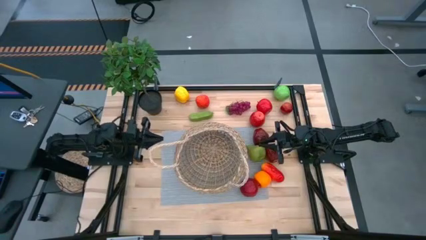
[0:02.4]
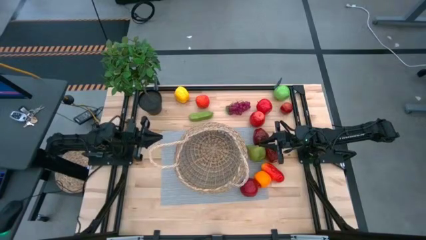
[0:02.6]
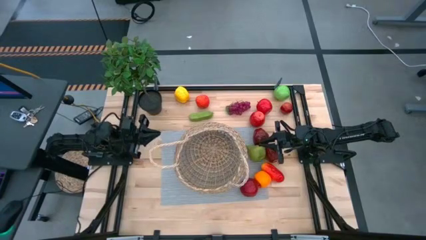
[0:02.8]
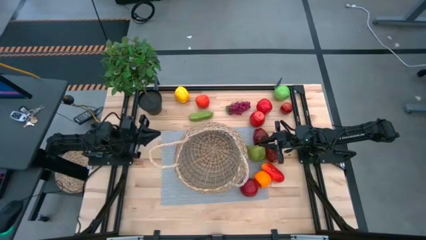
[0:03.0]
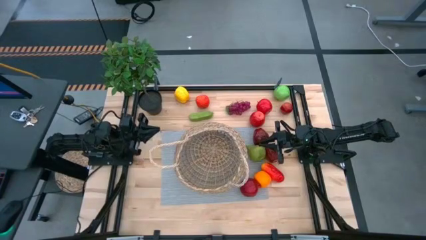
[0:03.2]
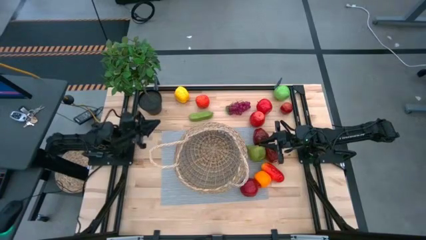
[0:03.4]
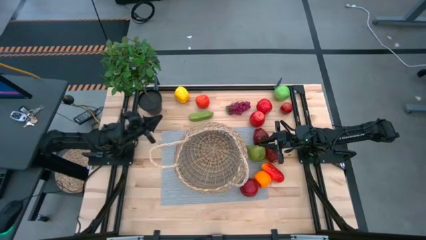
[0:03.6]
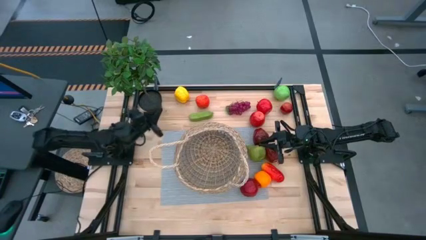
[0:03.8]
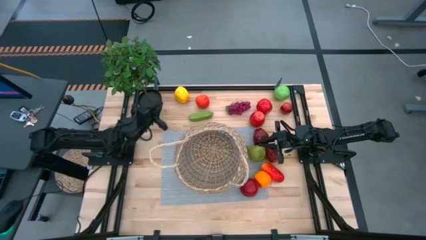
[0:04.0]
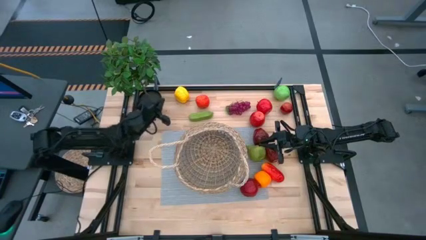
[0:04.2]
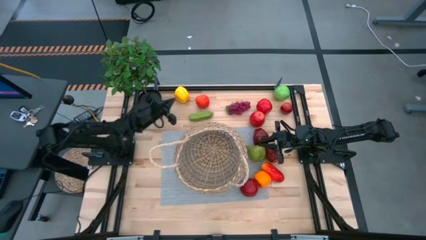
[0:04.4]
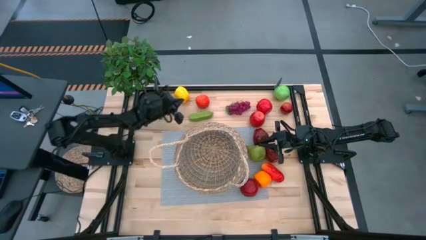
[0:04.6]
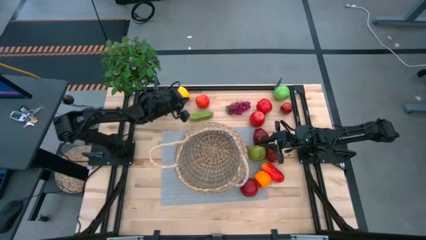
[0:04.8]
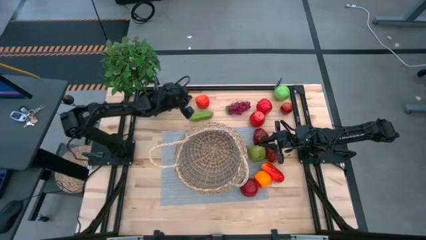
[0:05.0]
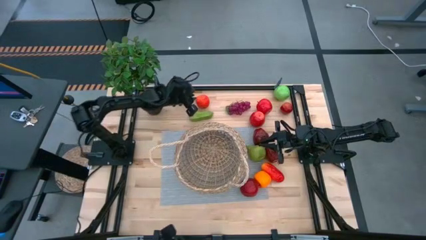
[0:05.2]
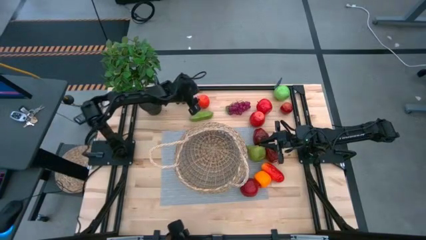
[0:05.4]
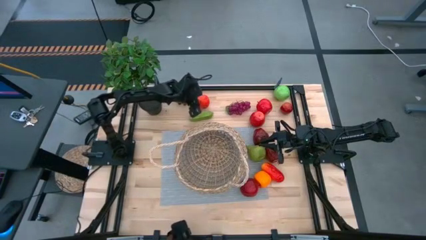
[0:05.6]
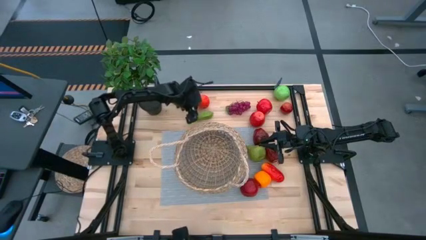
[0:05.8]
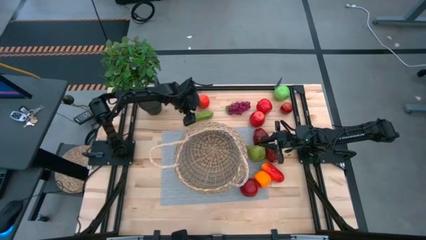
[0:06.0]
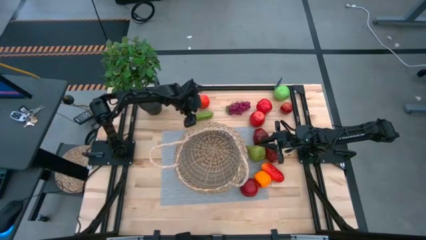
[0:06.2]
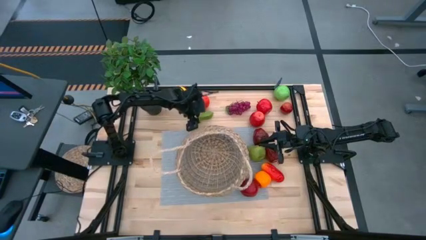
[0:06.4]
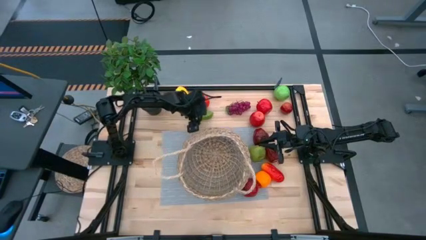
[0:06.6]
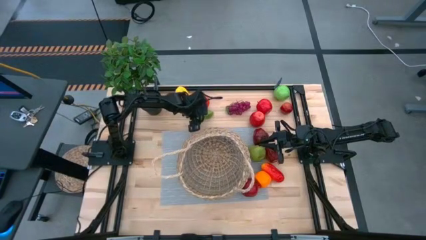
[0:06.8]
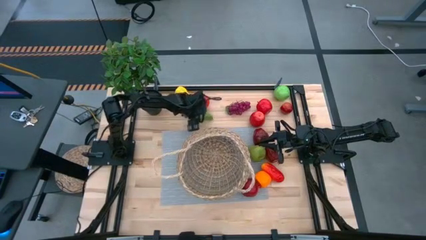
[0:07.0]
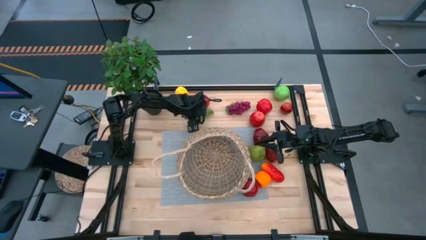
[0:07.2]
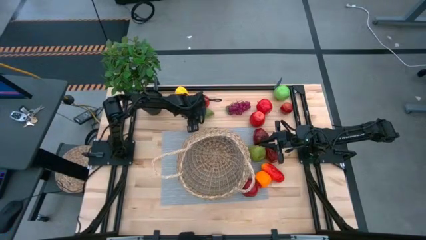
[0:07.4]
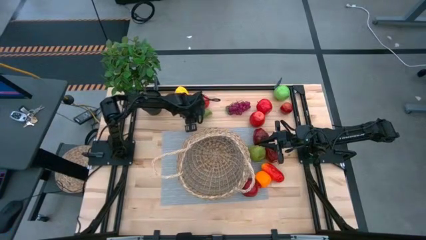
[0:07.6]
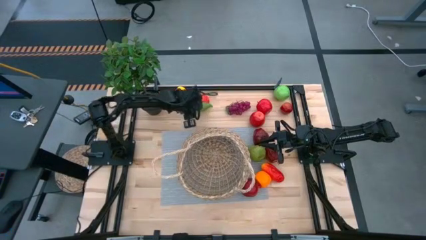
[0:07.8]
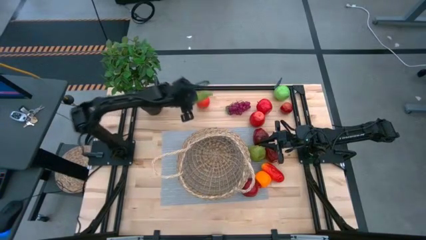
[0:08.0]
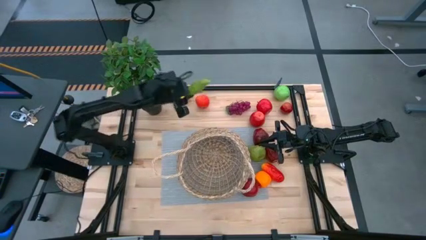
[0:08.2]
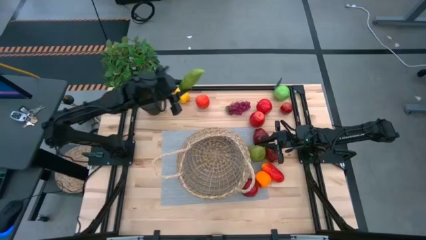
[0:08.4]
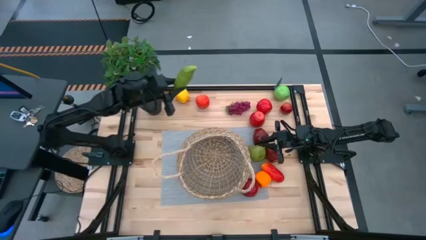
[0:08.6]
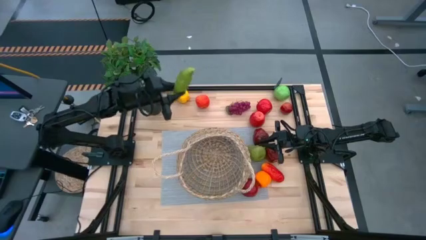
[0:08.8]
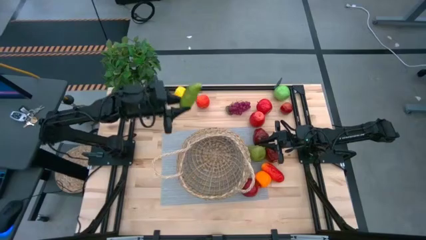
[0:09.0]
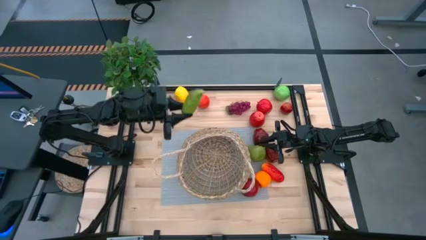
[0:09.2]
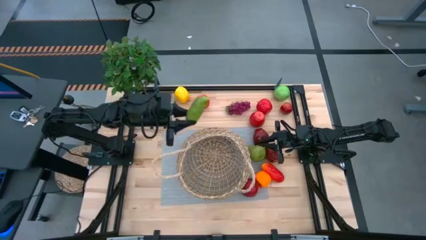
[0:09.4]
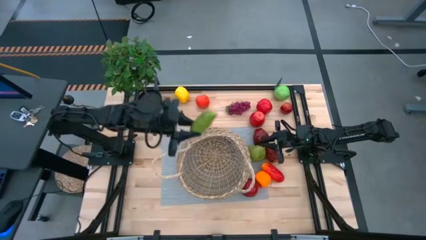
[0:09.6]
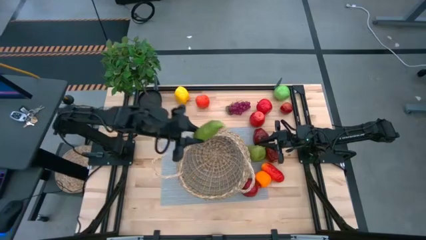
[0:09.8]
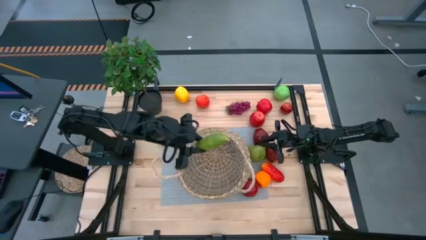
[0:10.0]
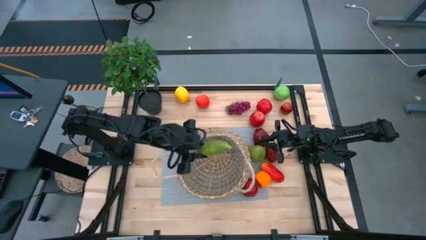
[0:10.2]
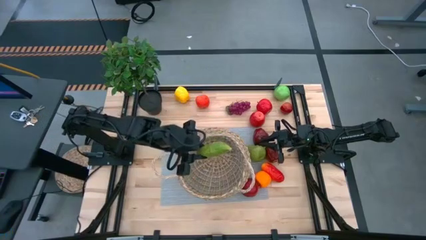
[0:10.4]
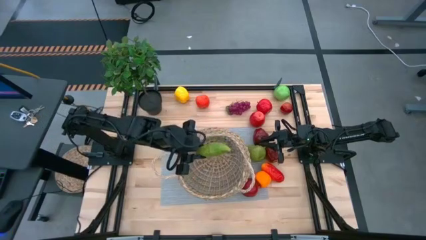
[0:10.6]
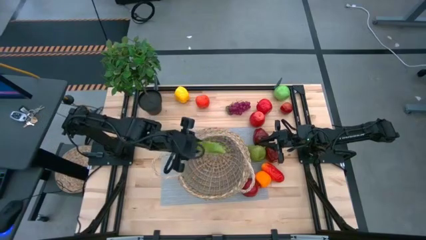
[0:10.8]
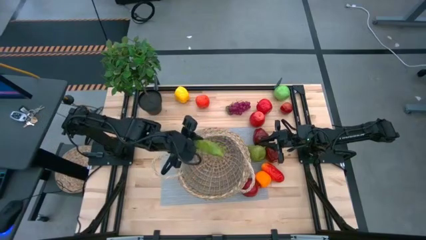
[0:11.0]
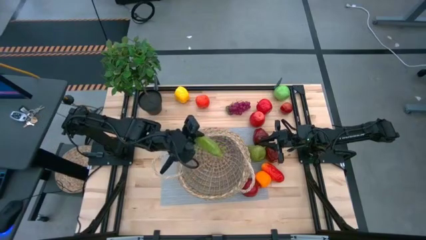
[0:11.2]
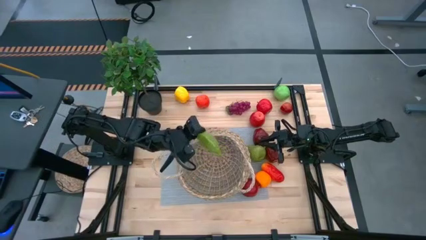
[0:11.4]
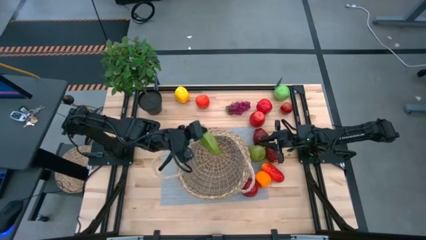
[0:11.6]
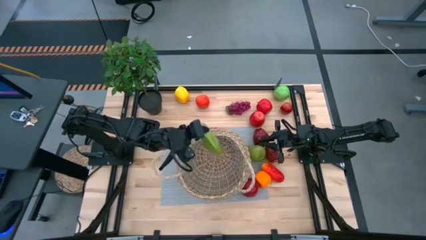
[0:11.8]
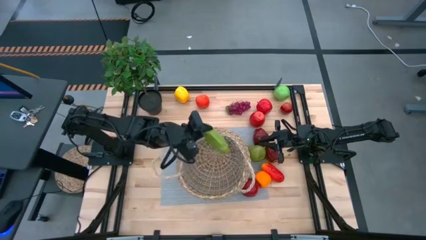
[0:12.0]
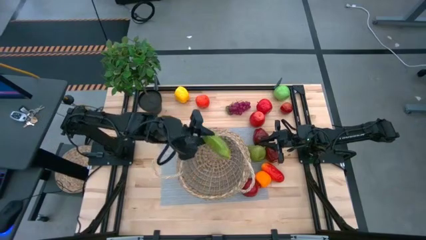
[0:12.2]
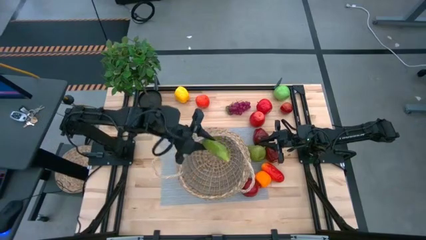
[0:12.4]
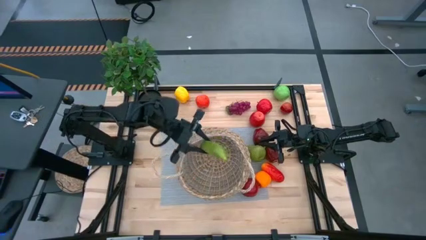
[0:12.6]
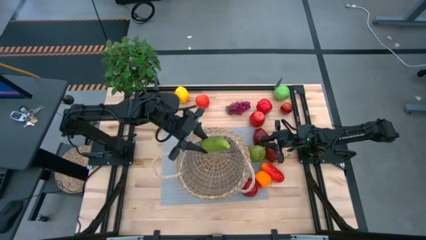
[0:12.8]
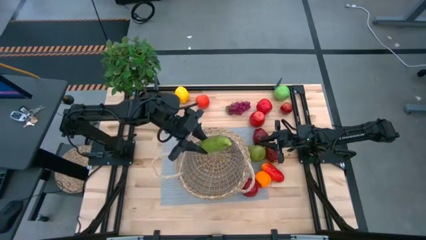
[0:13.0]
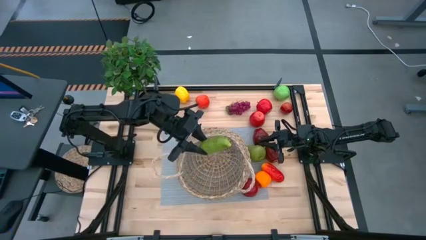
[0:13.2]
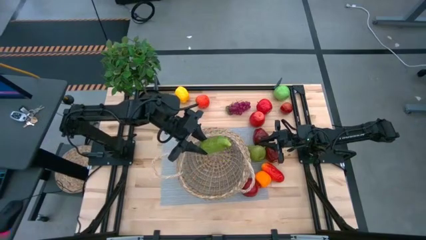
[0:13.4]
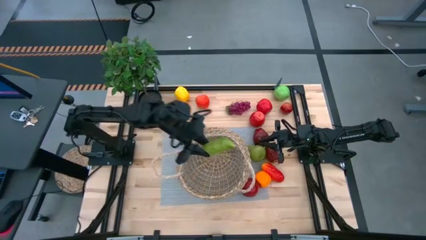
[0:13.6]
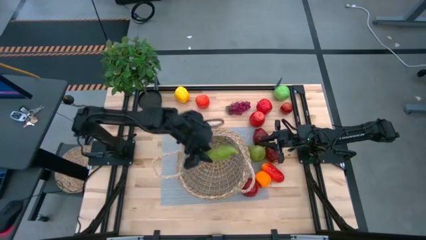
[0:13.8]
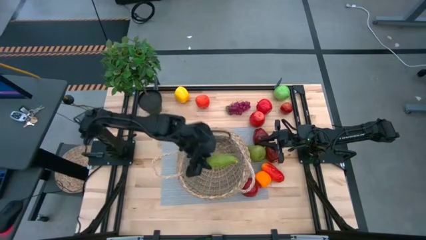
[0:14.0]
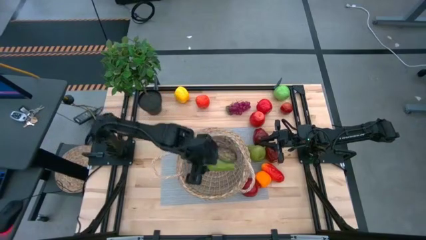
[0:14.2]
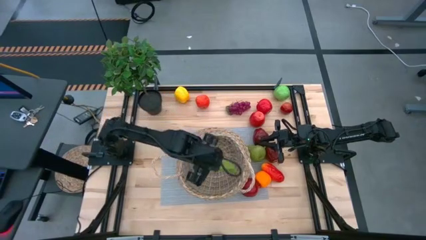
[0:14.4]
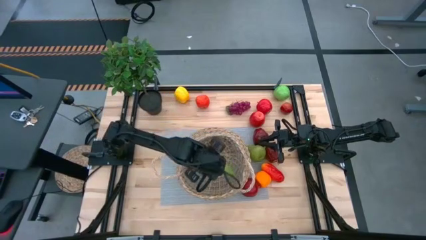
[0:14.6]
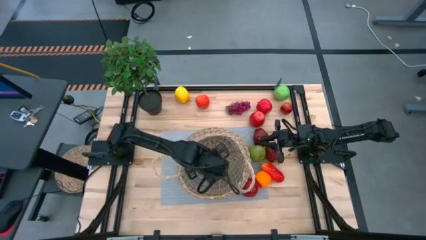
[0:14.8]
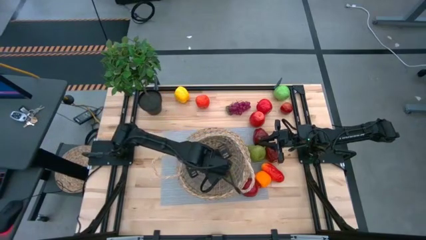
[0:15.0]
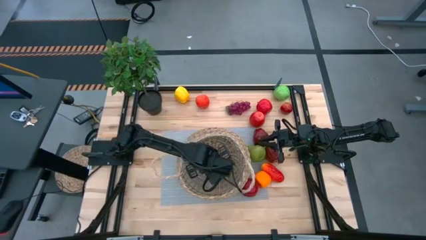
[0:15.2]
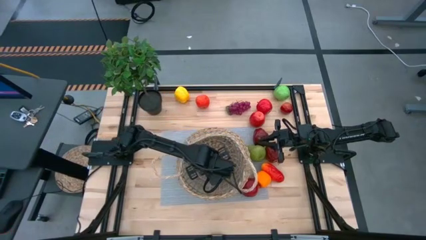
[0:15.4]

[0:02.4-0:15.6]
Task: Build produce basket
Put the cucumber into the basket

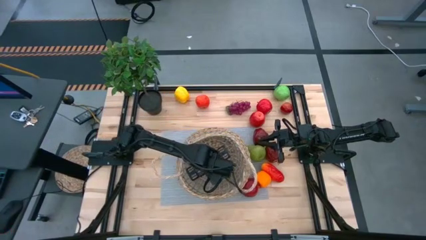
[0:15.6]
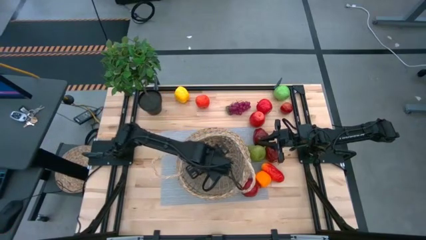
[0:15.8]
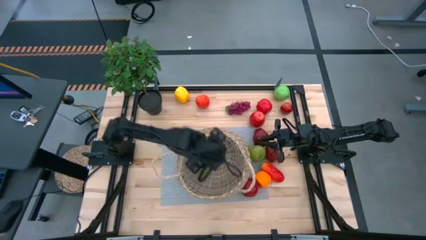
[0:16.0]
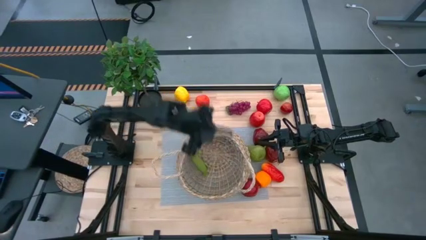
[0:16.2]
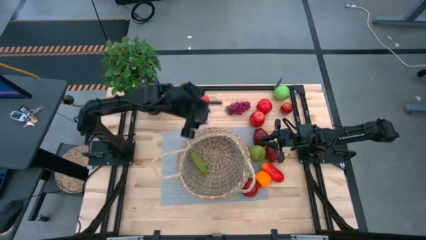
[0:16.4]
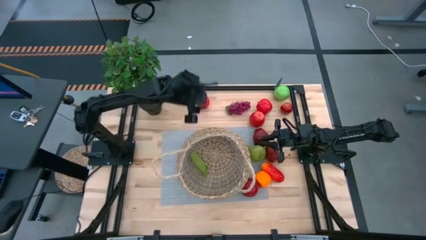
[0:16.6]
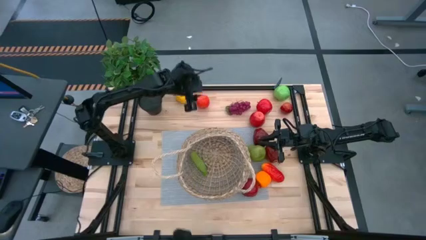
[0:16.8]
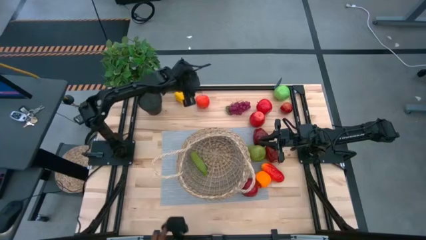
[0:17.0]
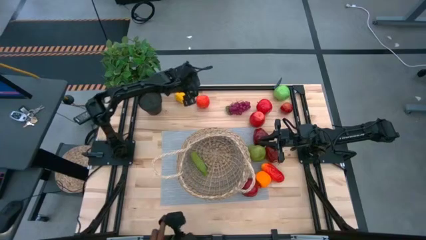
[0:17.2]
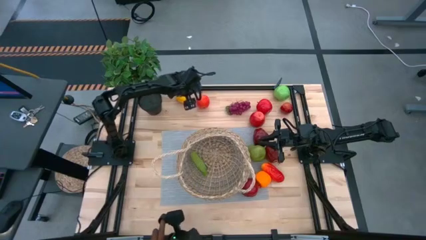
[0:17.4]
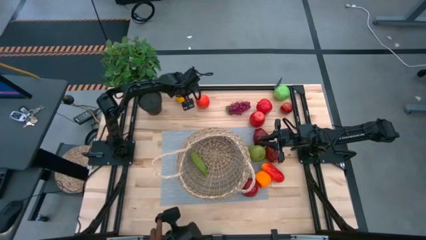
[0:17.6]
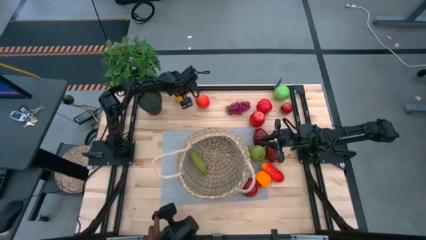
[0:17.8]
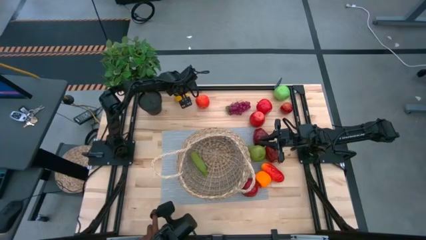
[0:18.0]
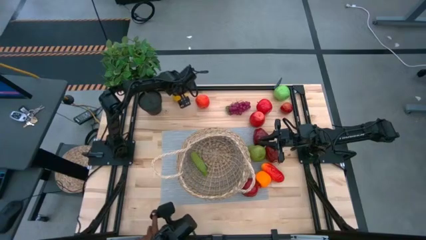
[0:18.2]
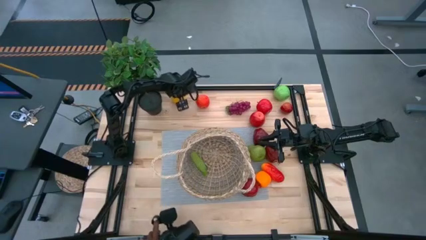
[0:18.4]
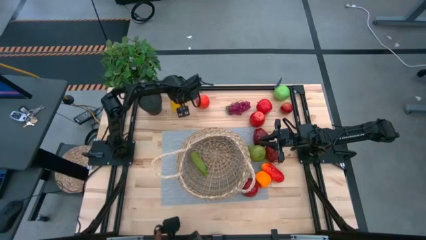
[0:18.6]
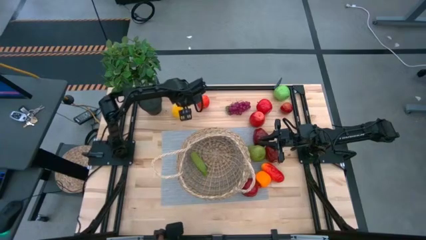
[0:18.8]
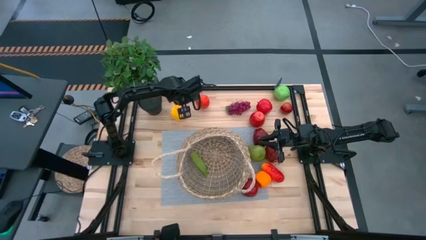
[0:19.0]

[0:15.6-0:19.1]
Put the bell pepper into the basket
